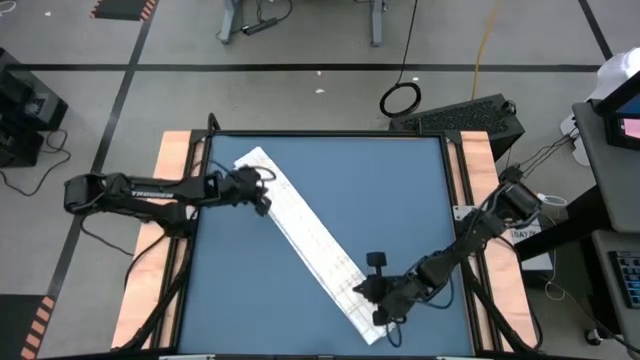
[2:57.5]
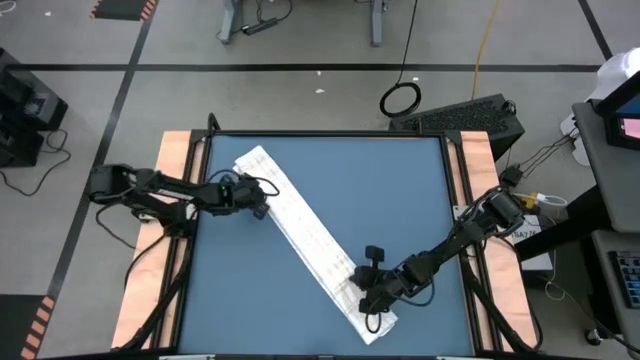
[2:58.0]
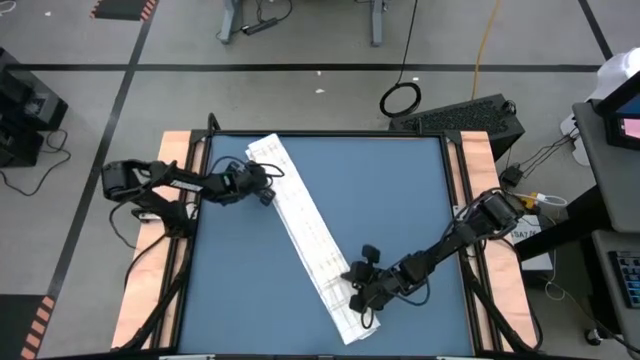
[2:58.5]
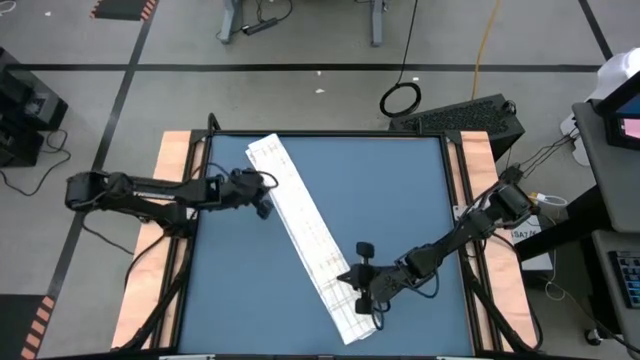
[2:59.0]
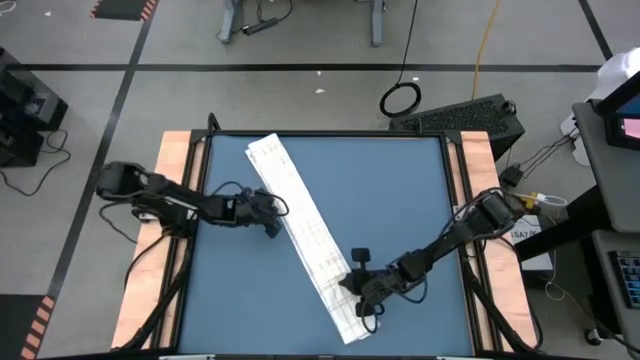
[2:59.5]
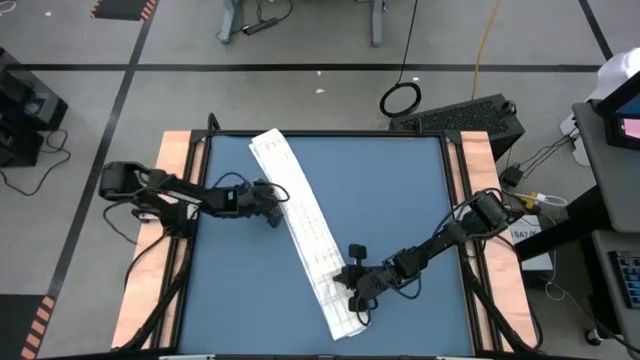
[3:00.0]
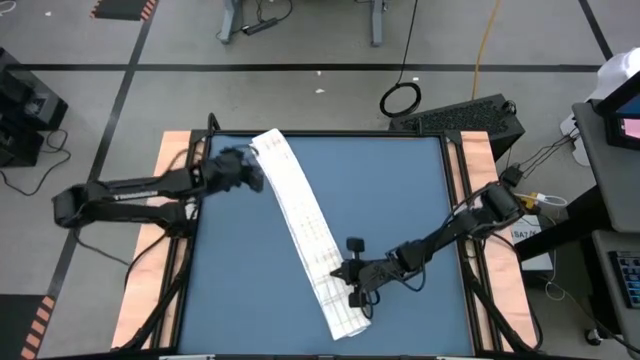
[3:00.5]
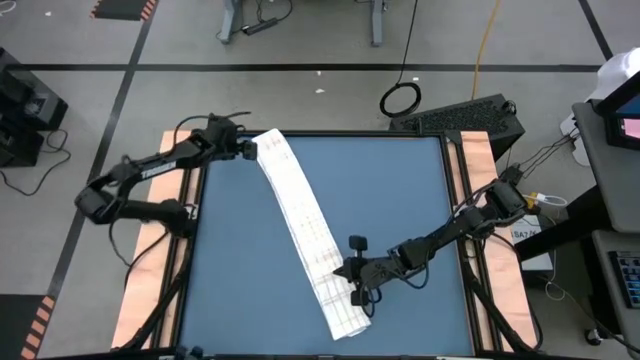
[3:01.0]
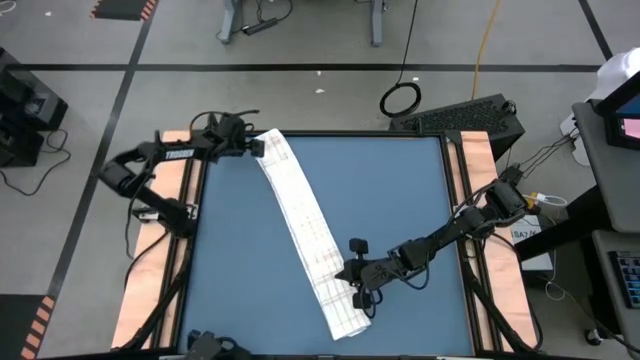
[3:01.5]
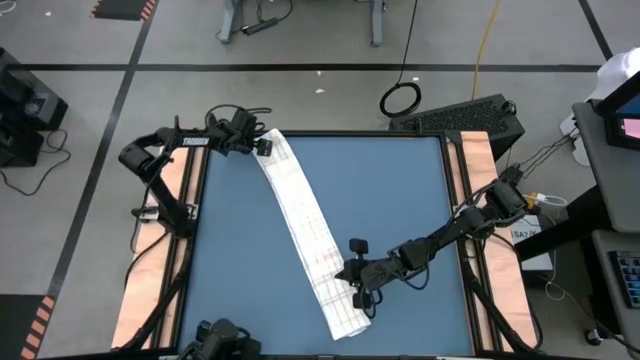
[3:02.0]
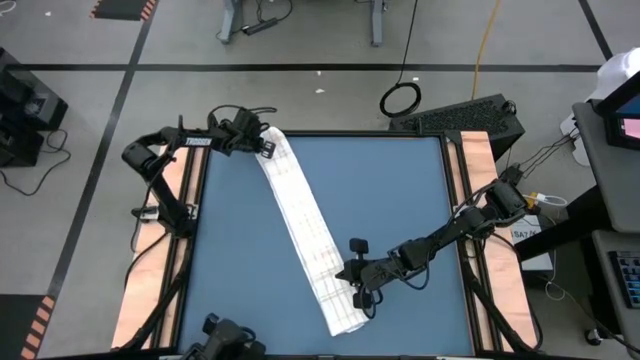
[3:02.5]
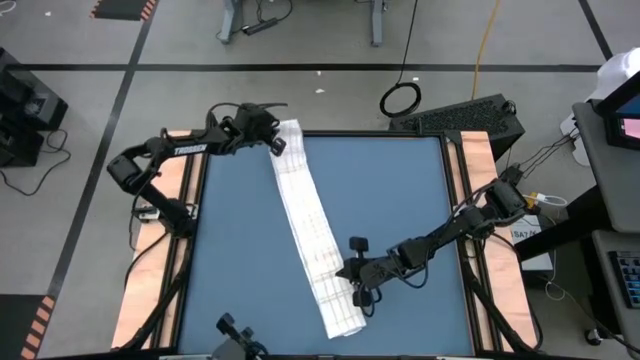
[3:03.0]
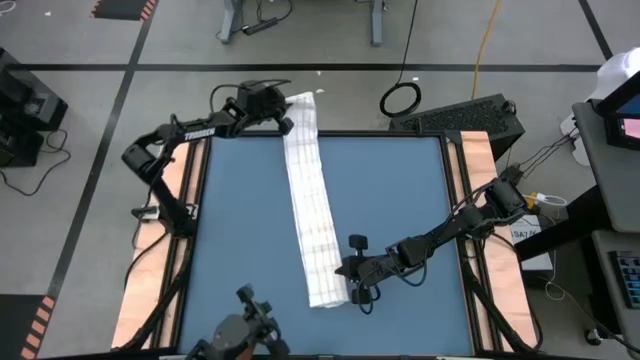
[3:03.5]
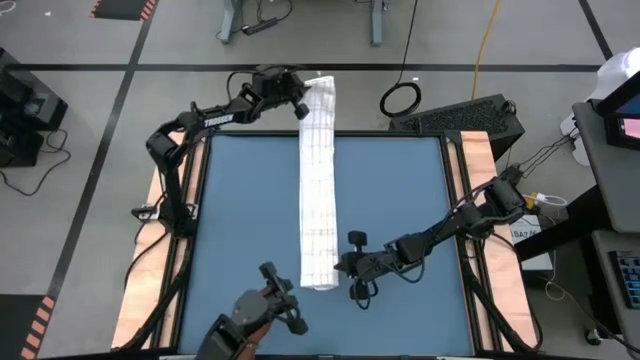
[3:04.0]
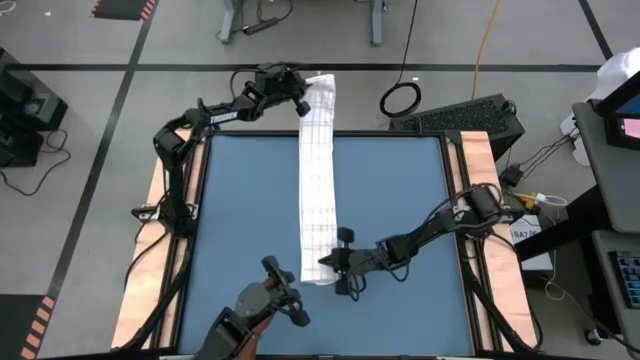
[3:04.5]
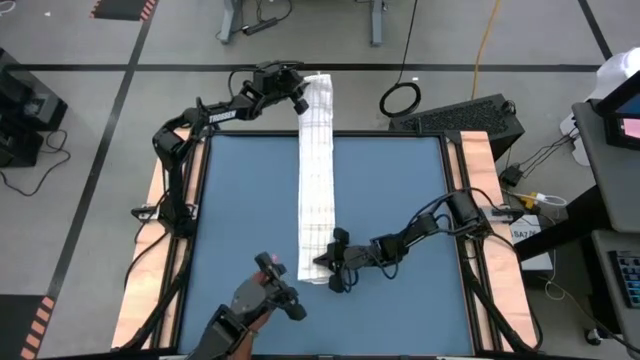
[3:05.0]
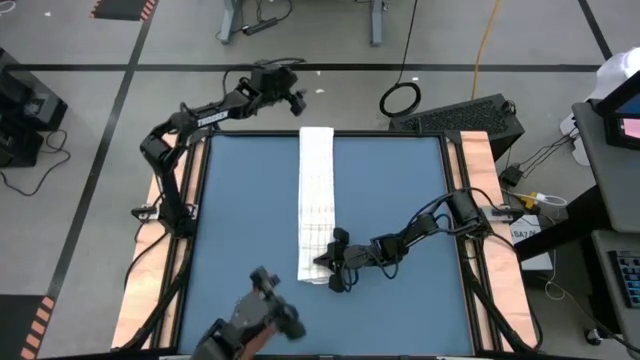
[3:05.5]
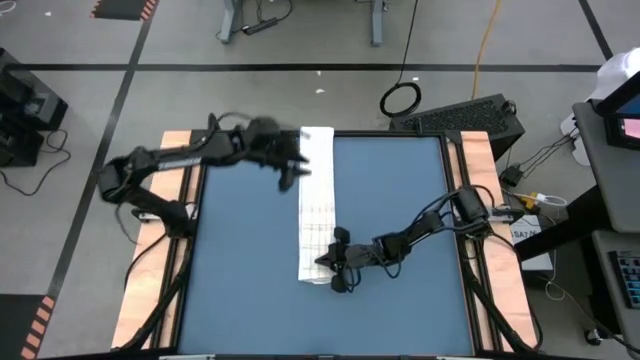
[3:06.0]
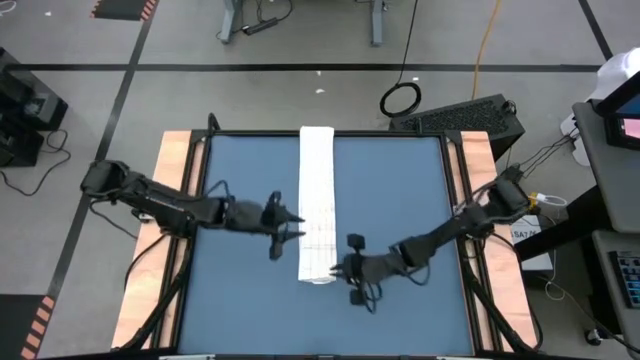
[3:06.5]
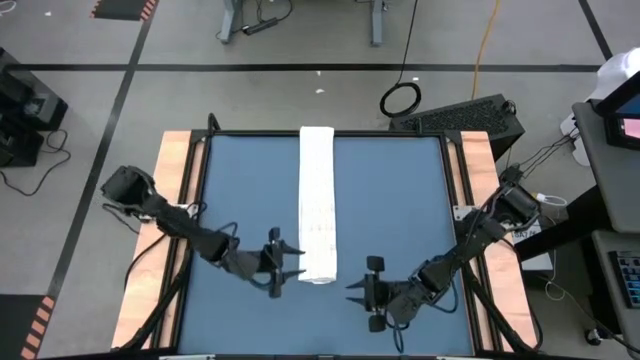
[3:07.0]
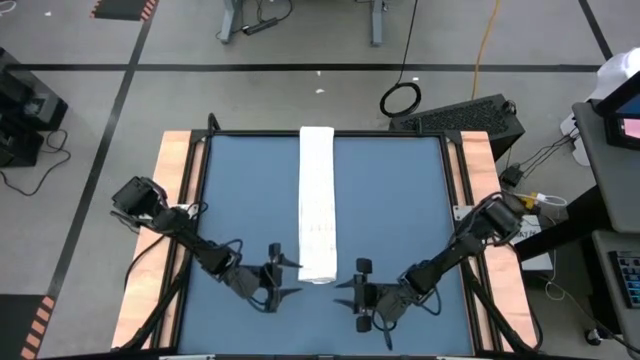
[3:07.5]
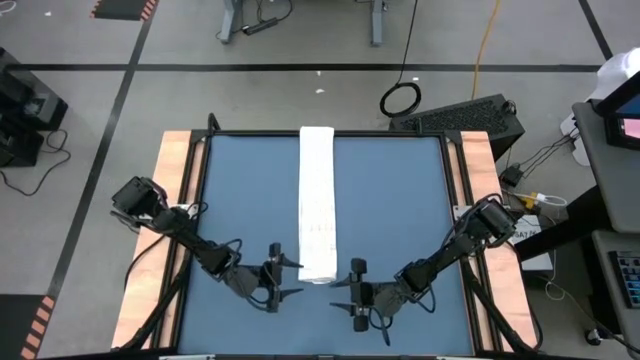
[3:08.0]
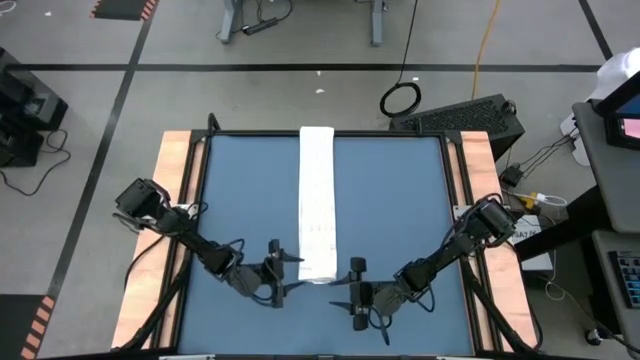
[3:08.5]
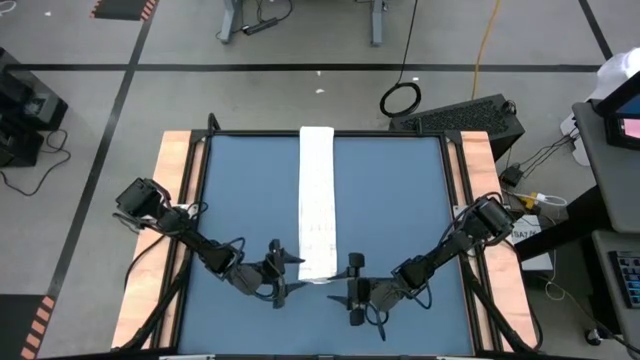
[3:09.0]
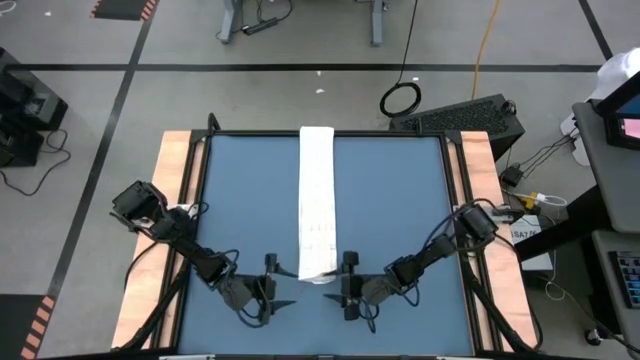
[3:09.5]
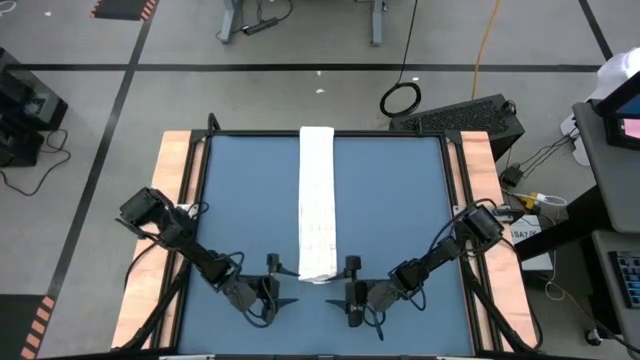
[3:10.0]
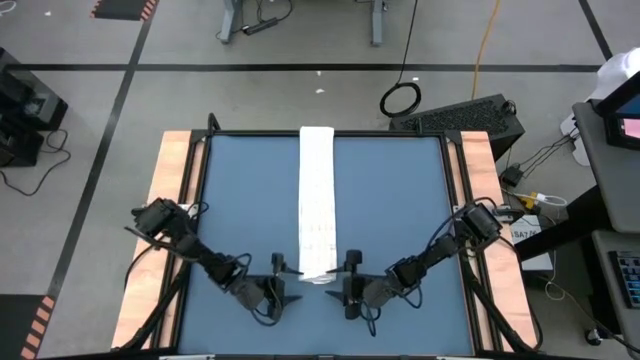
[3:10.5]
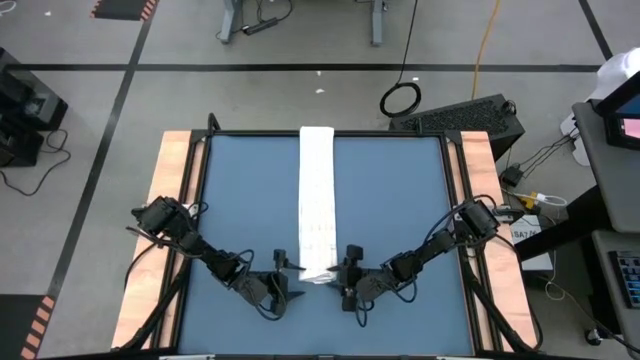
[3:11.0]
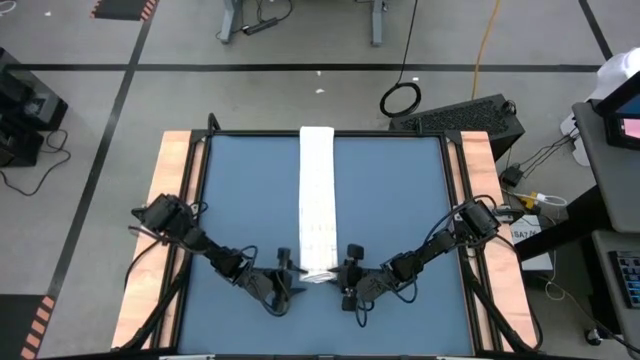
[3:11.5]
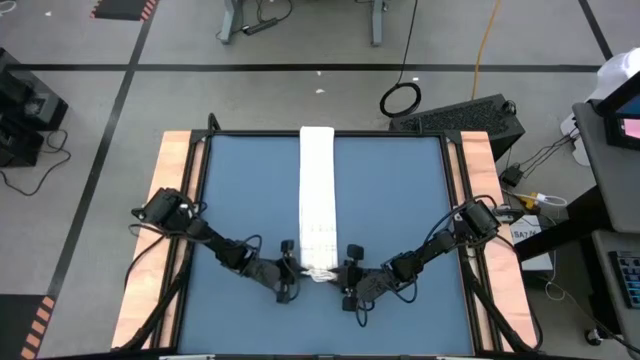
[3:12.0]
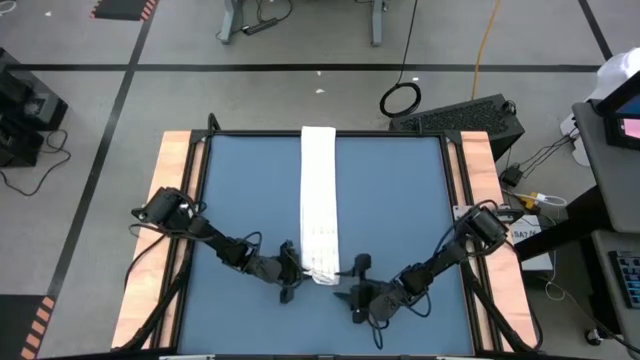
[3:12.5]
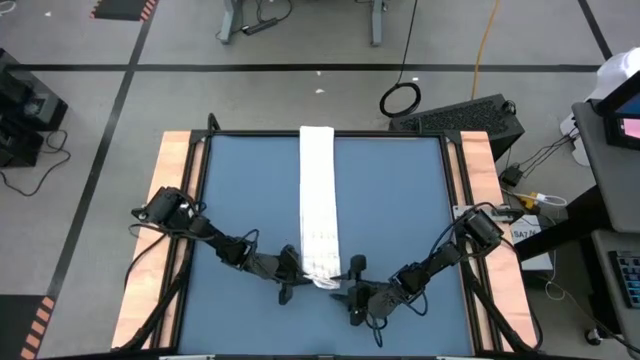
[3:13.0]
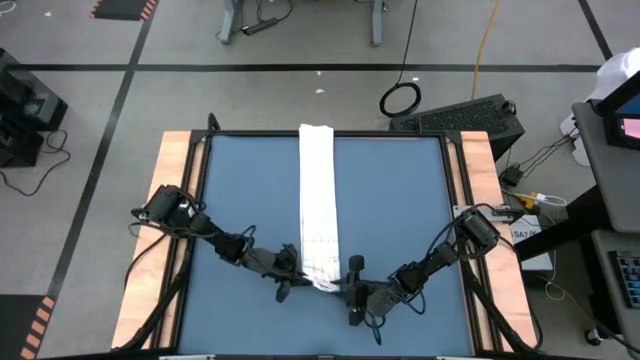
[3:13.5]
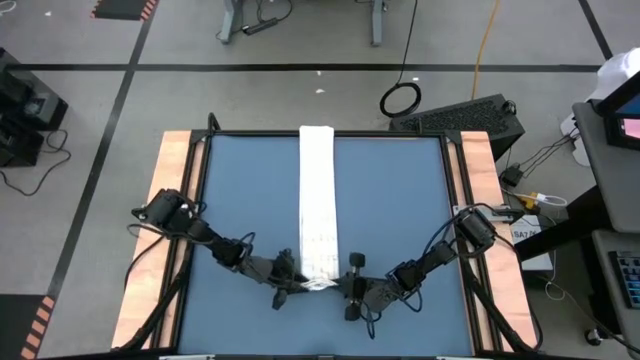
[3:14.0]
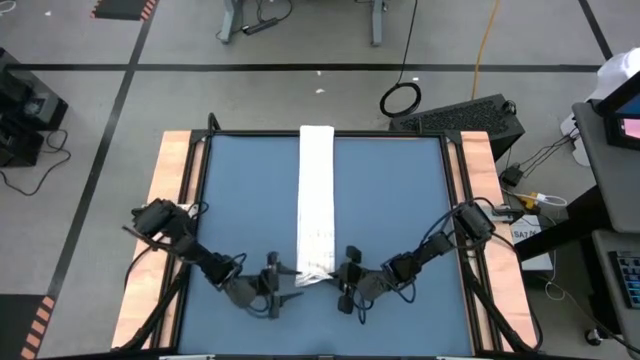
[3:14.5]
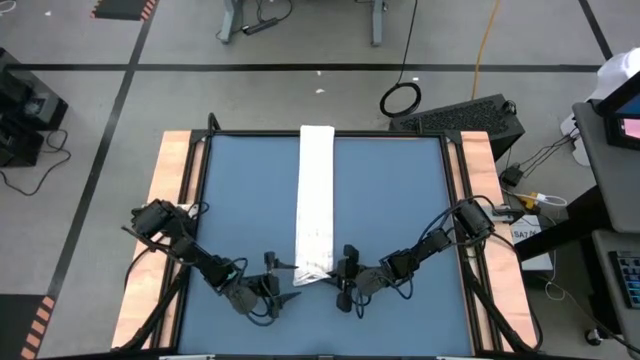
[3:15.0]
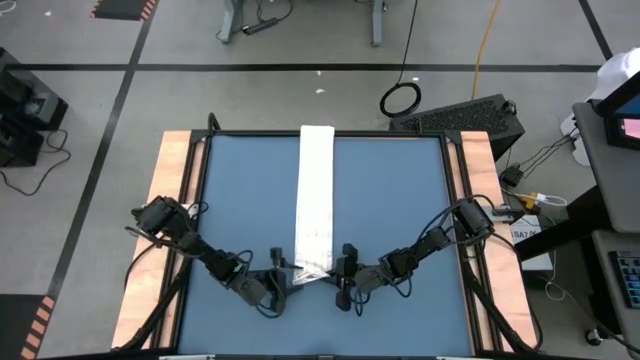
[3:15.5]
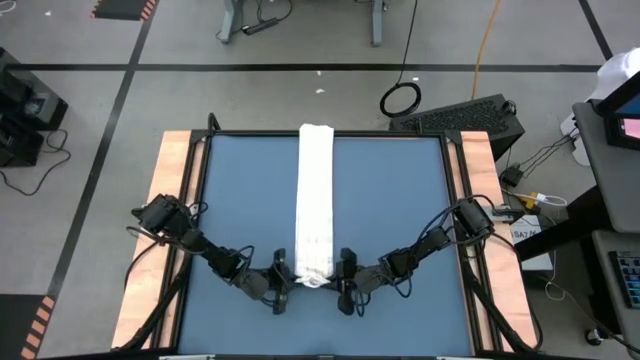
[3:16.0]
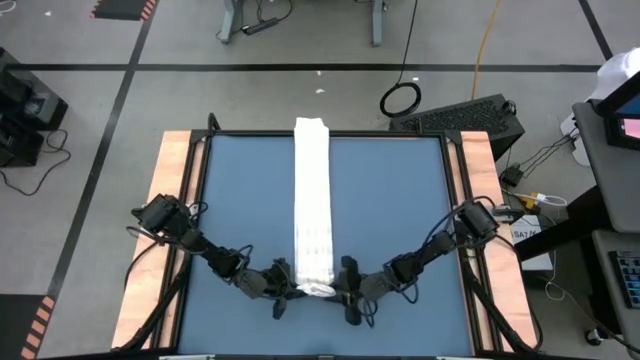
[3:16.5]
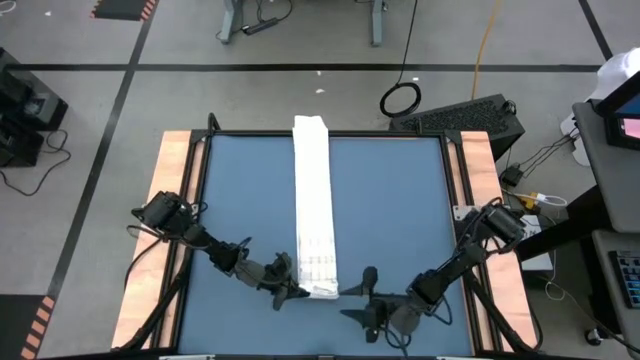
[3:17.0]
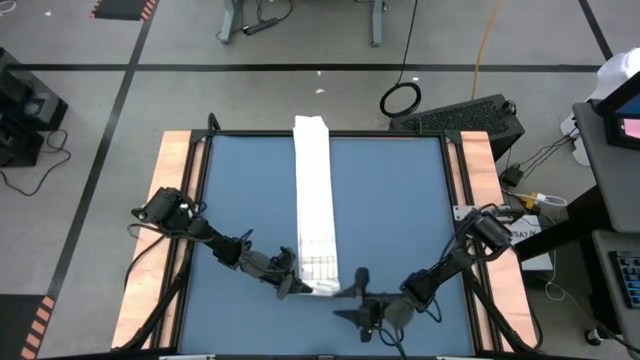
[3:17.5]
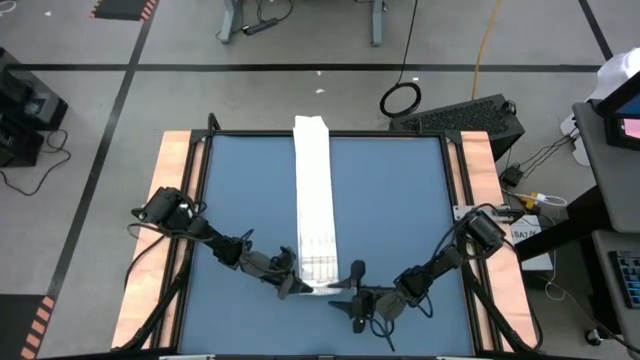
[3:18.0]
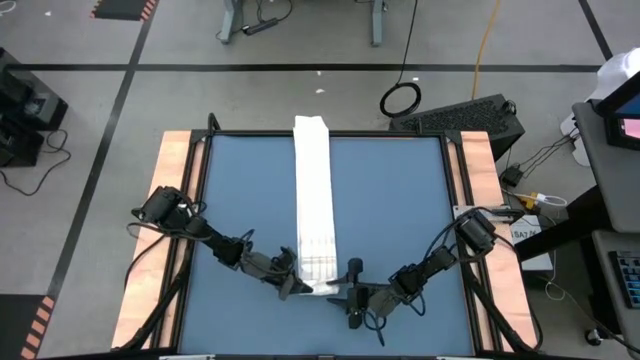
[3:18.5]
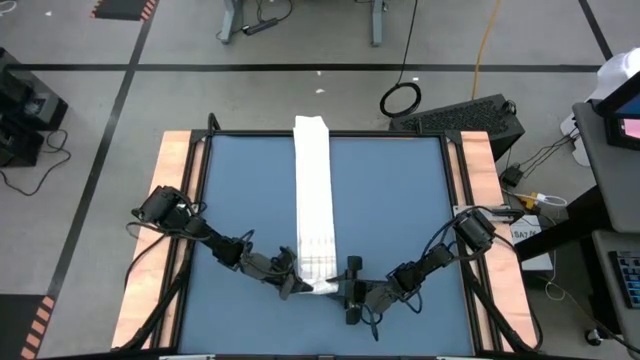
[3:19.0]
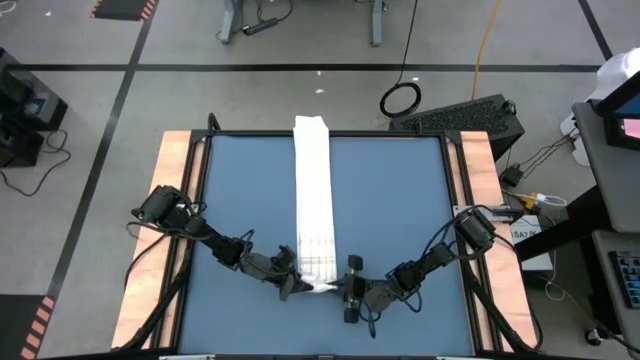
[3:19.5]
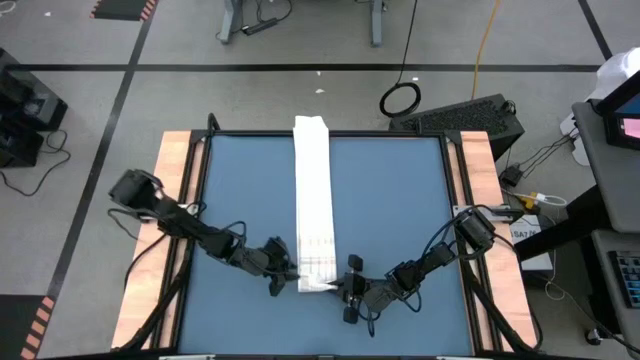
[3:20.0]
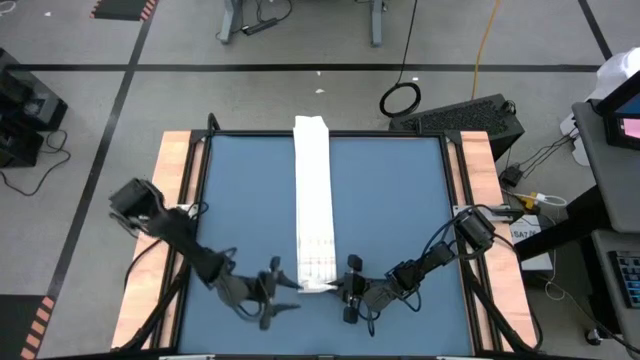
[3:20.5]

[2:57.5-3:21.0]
Task: Roll towel into tight, uniform cylinder
Roll the white towel
